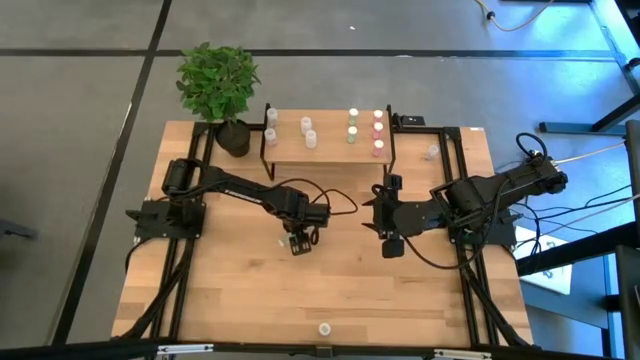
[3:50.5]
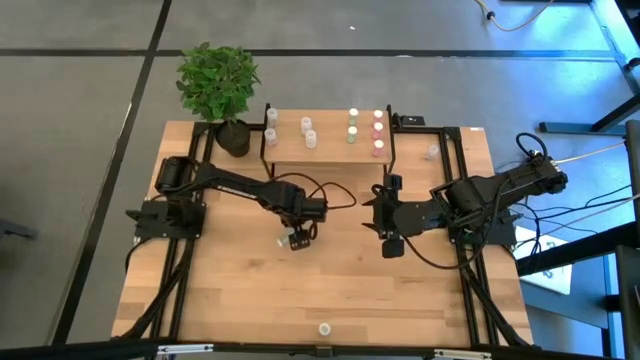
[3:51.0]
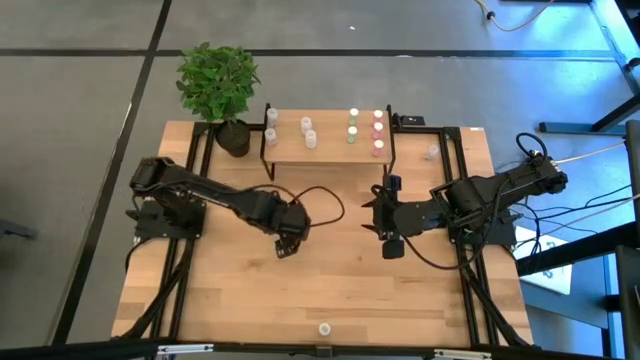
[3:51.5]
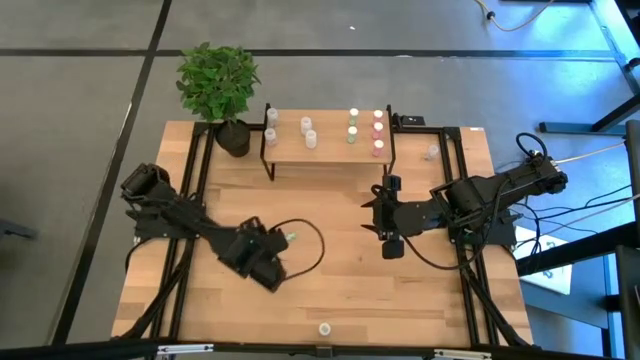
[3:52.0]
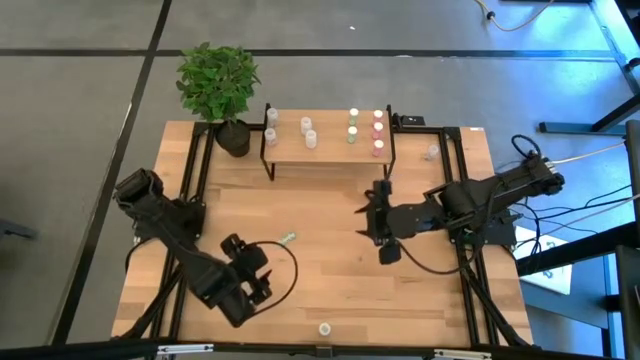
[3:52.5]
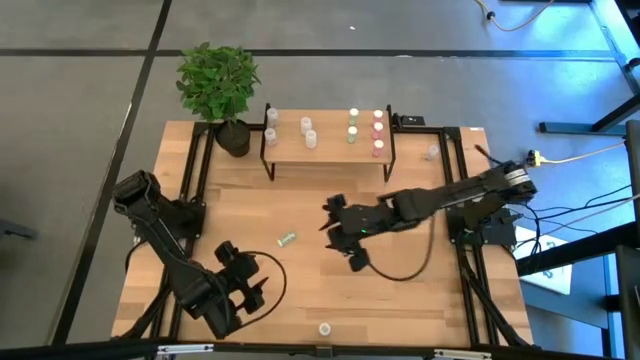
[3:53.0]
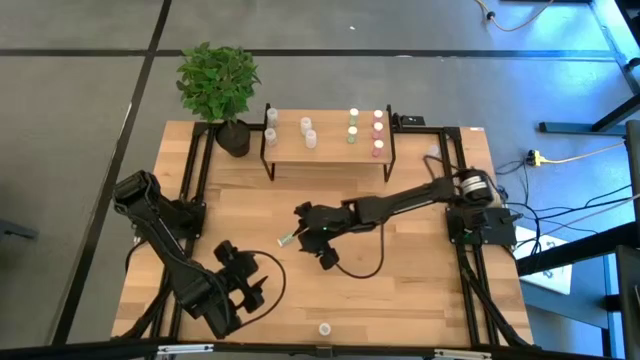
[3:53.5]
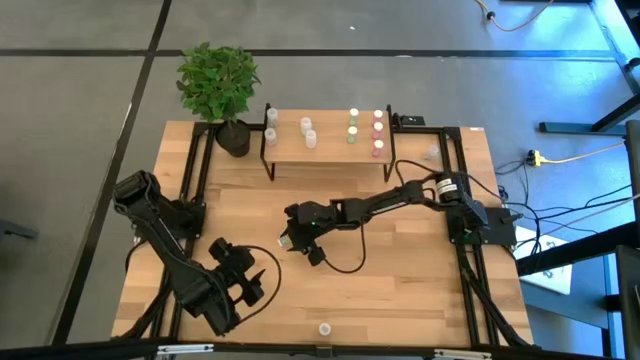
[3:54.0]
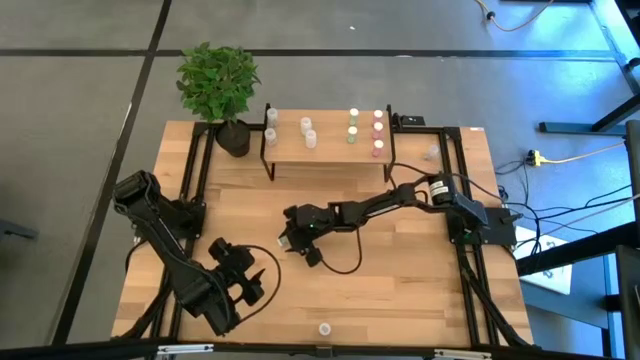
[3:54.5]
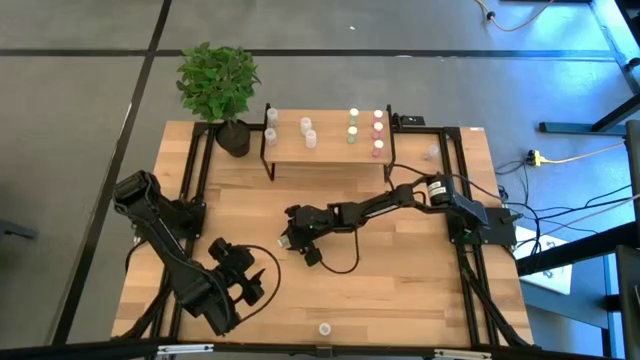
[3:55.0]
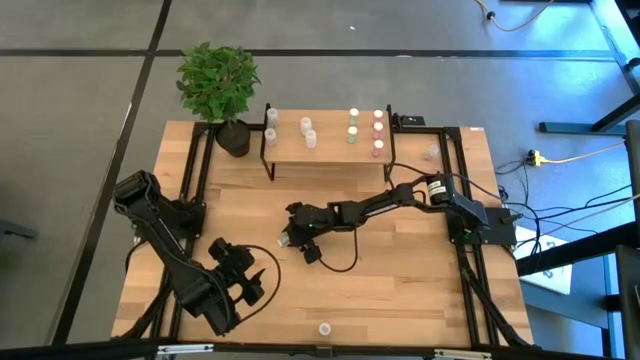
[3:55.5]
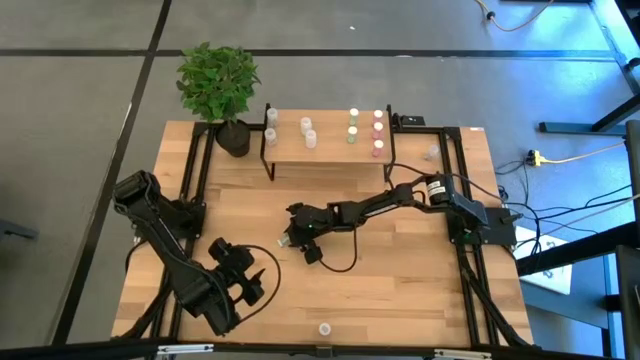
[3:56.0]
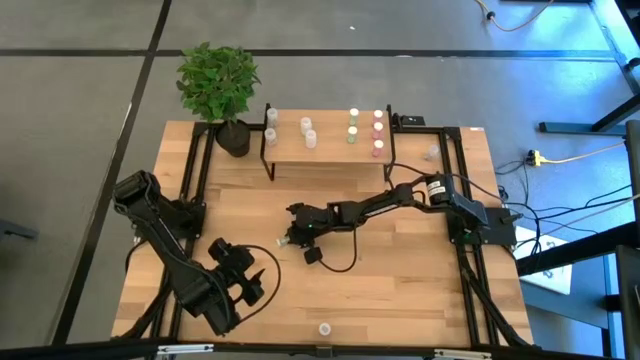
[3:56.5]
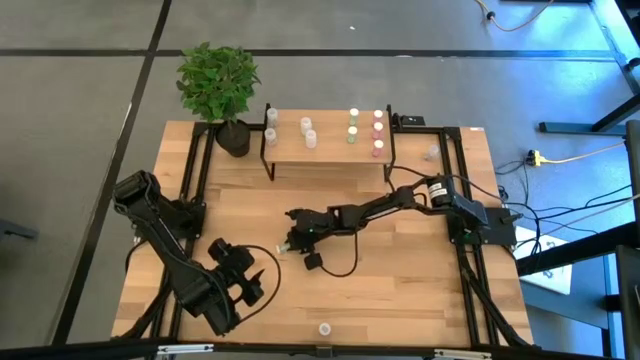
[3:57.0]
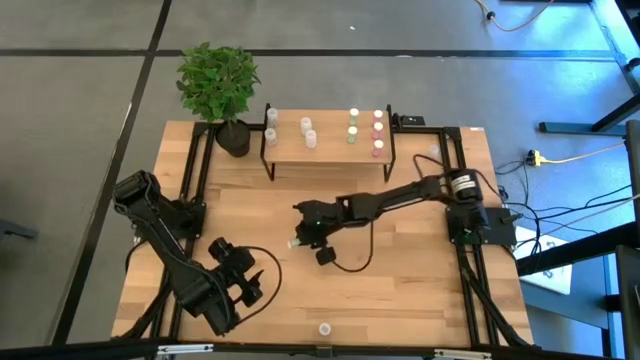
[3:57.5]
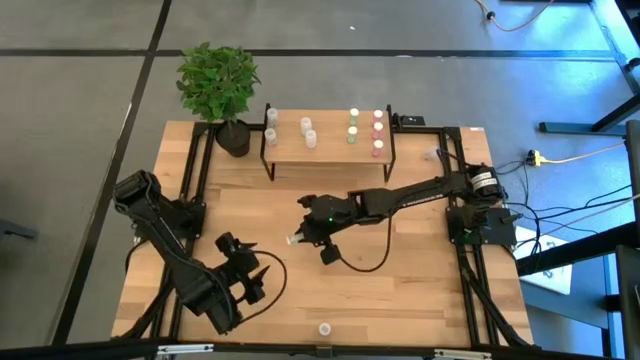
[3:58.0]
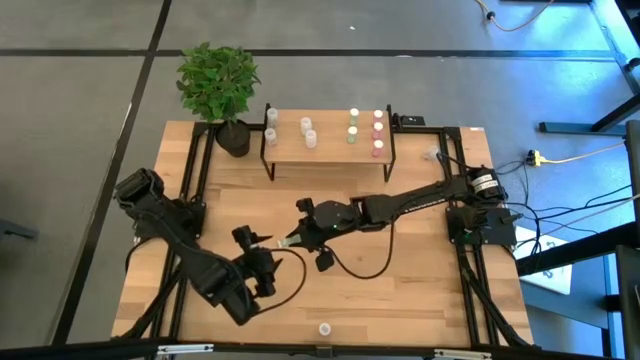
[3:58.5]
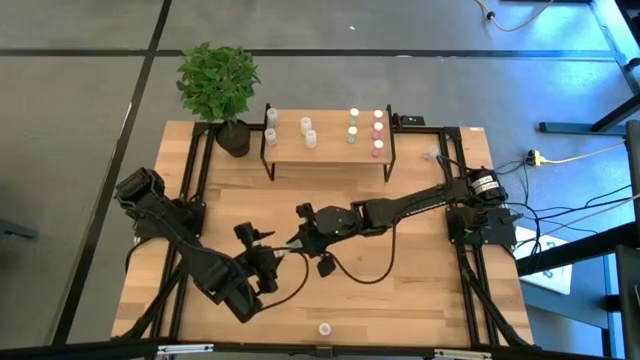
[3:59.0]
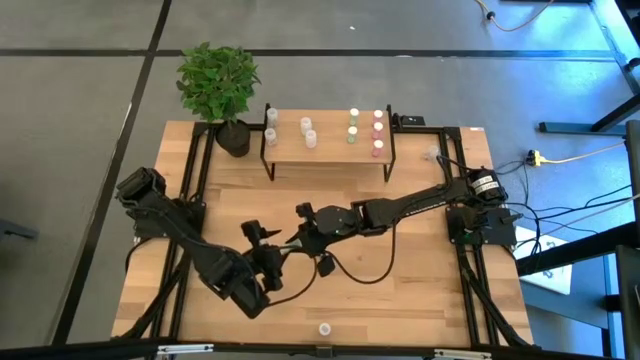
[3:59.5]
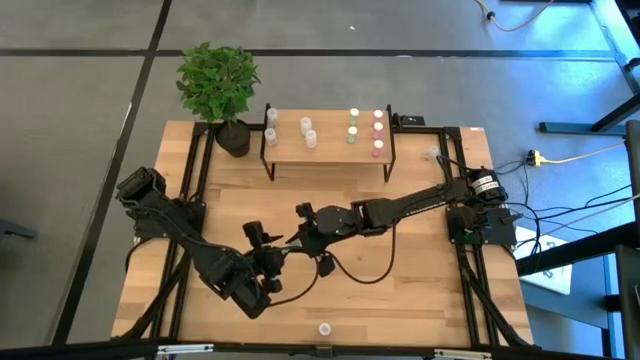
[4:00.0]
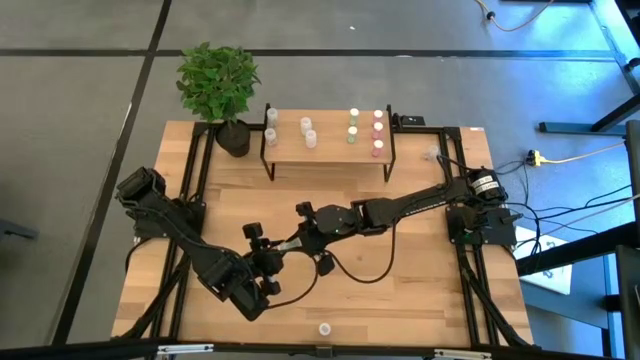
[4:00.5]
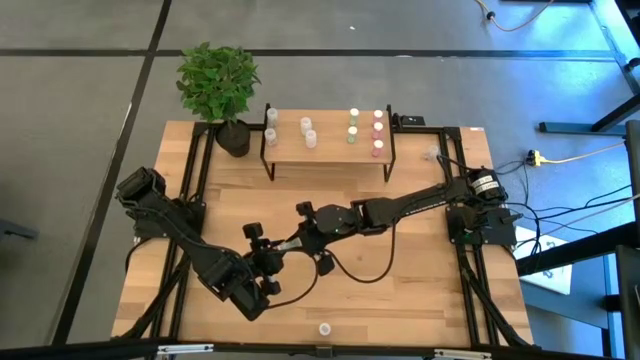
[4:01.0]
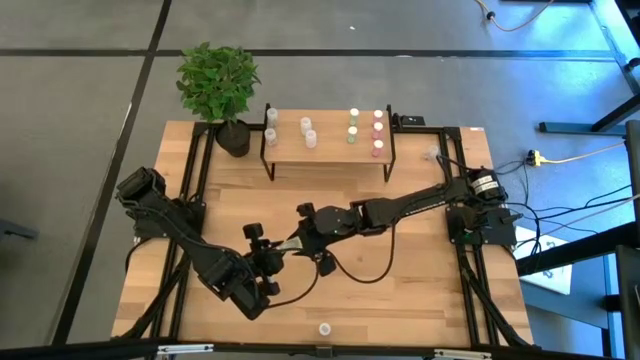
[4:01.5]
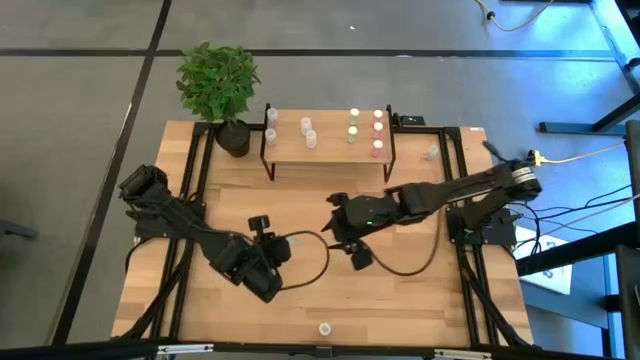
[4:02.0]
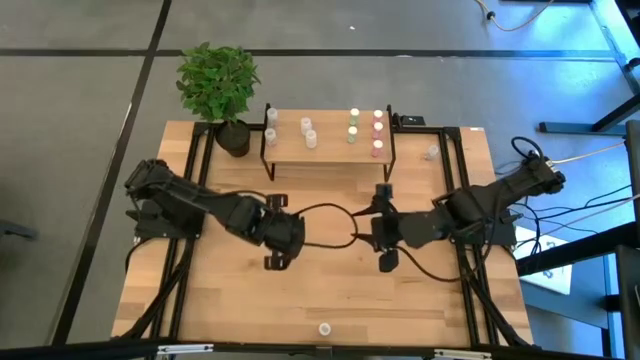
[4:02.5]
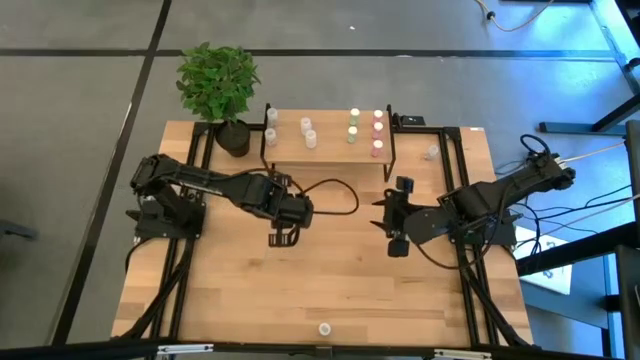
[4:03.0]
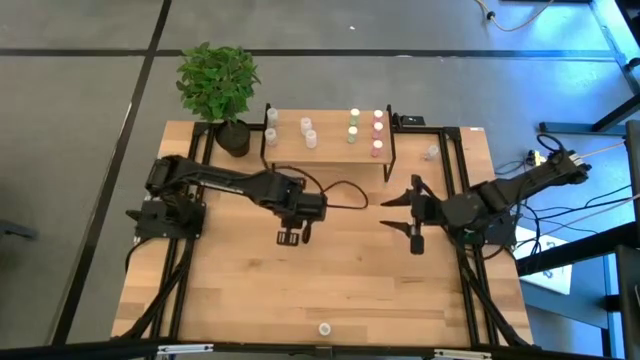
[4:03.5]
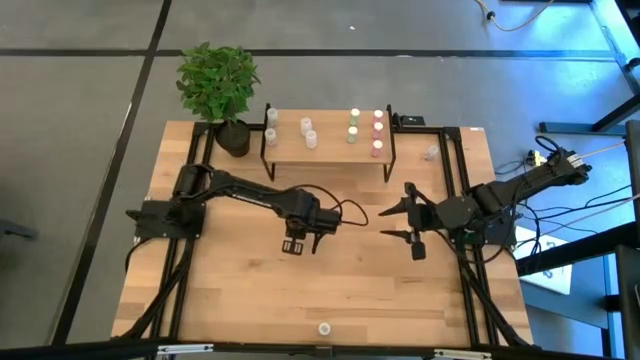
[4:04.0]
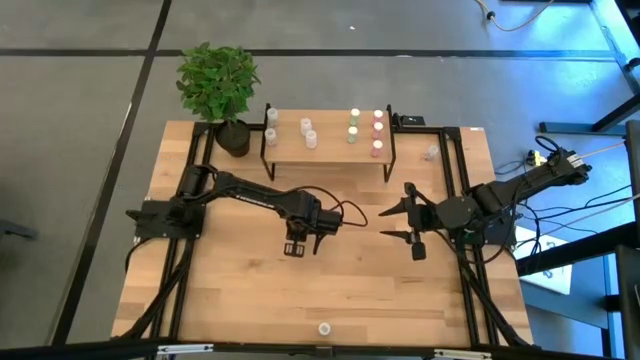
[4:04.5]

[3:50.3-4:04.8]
Task: Pick and place medicine bottles onto shelf by color
Put the green pill bottle on the shelf aligned with the other green pill bottles

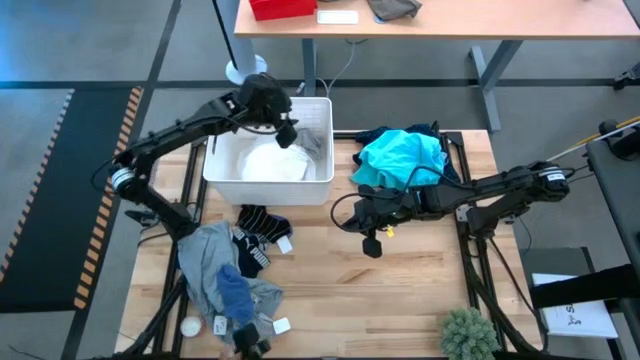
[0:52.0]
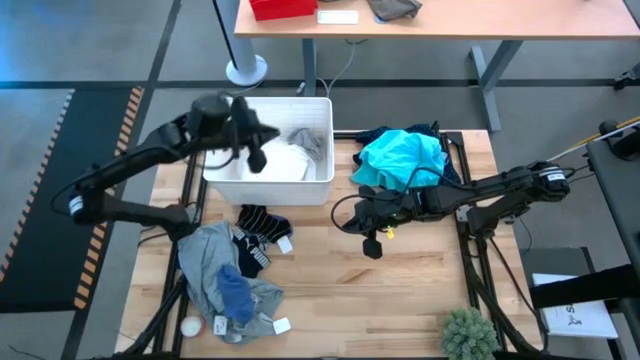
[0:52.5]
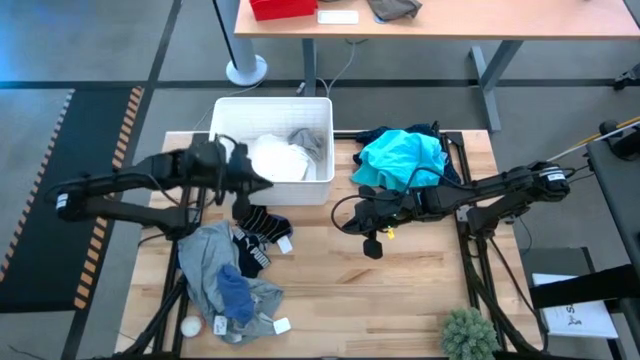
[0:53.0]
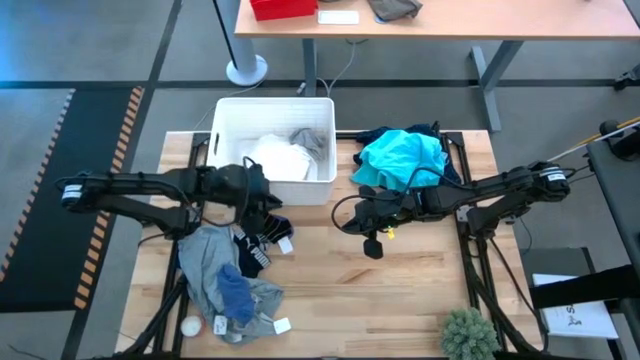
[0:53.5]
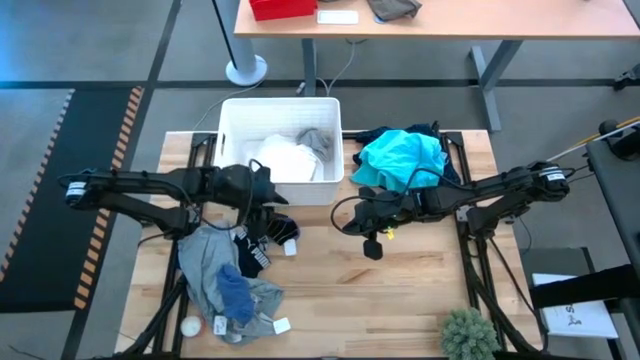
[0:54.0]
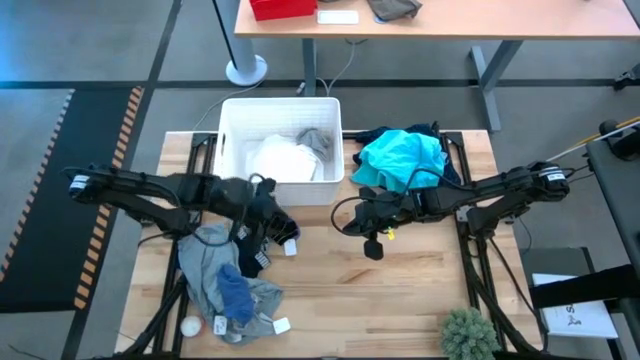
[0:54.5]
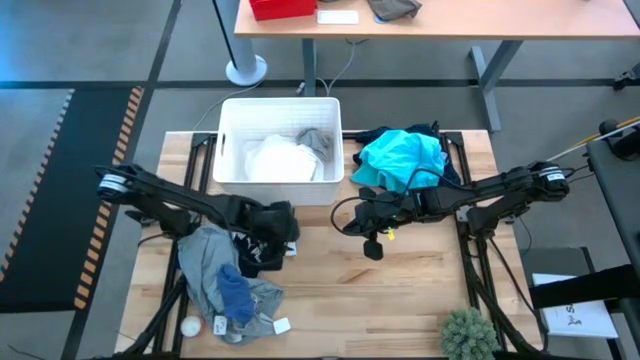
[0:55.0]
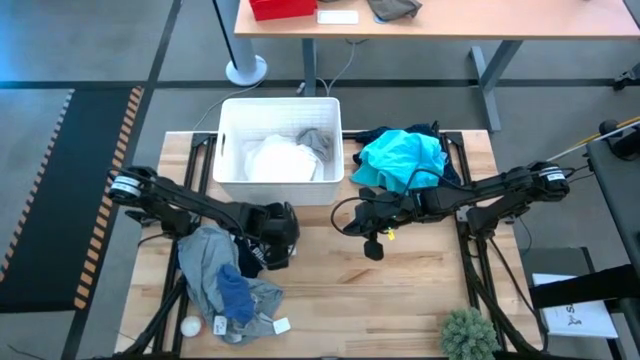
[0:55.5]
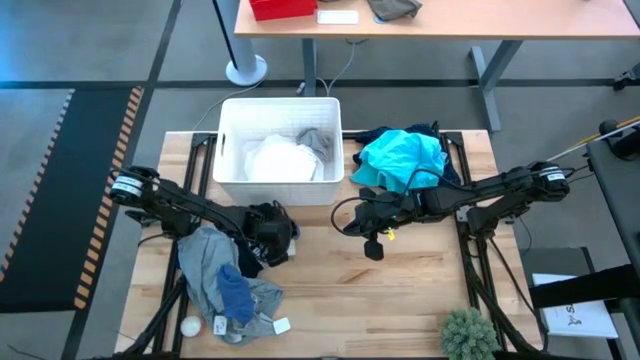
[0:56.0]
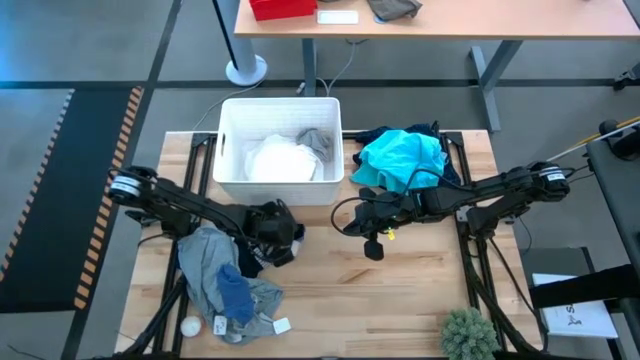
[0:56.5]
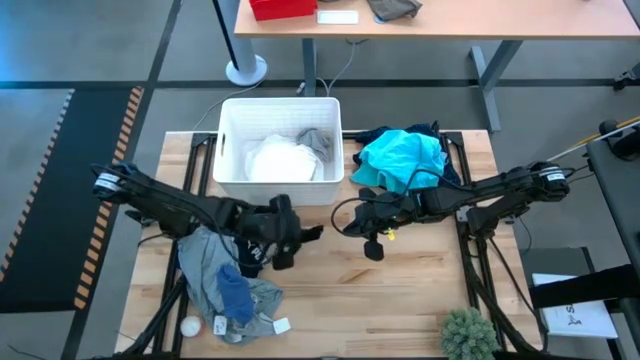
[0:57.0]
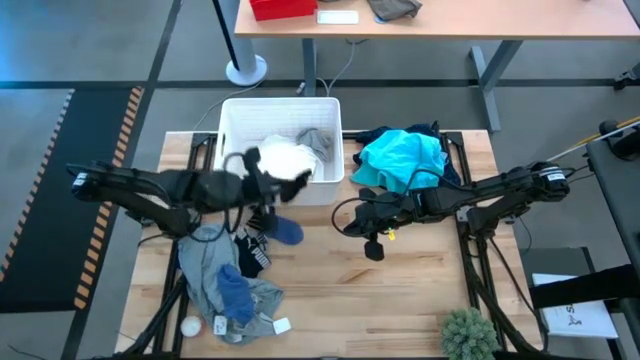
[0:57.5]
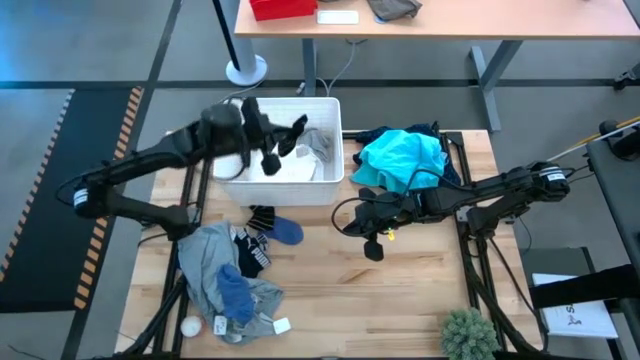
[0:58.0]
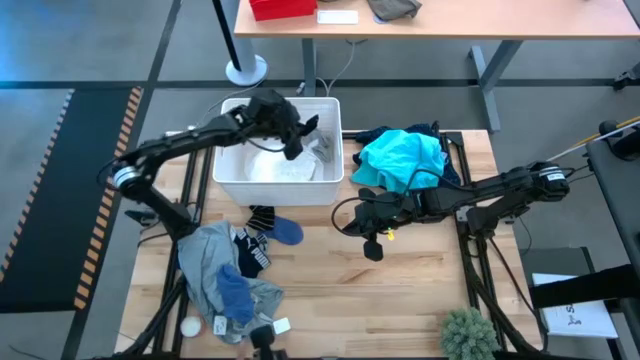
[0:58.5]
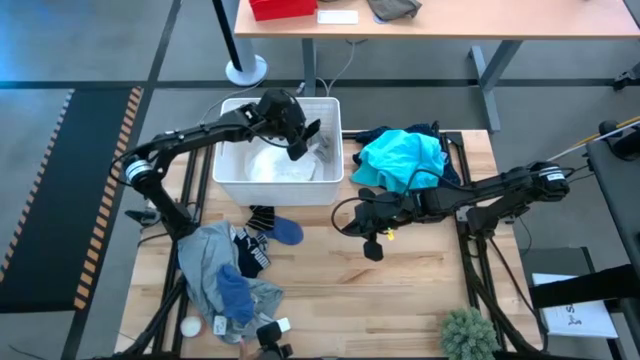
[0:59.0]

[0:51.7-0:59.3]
Task: Sort clothes
Put the right black sock into the white bin
